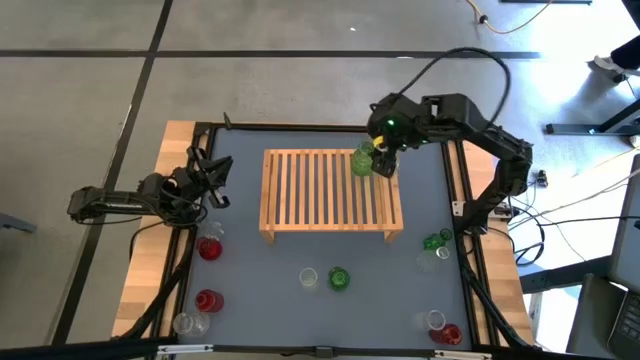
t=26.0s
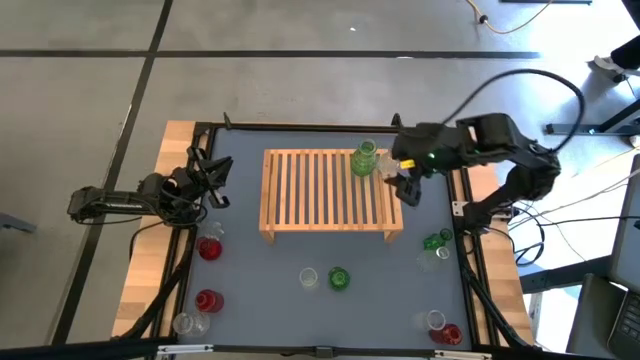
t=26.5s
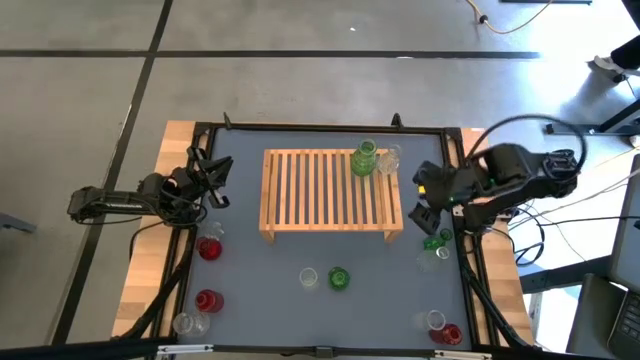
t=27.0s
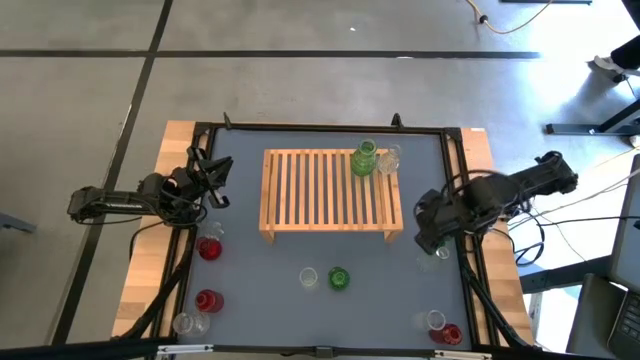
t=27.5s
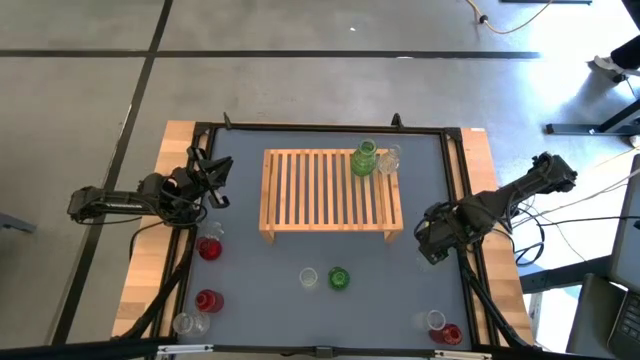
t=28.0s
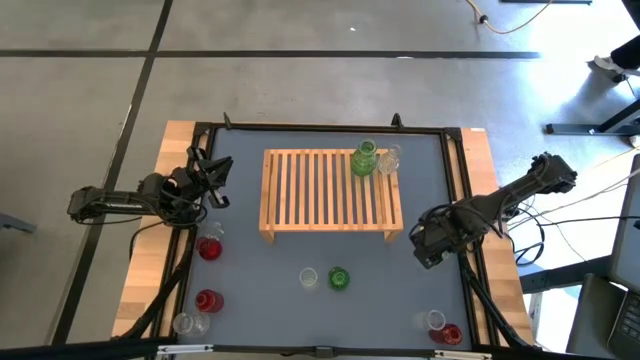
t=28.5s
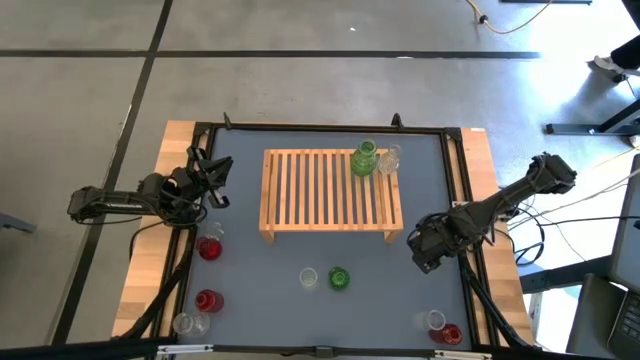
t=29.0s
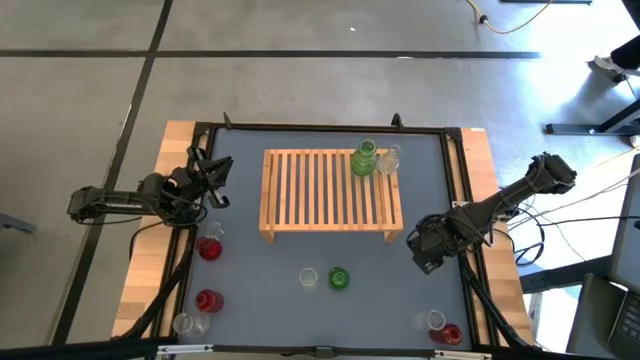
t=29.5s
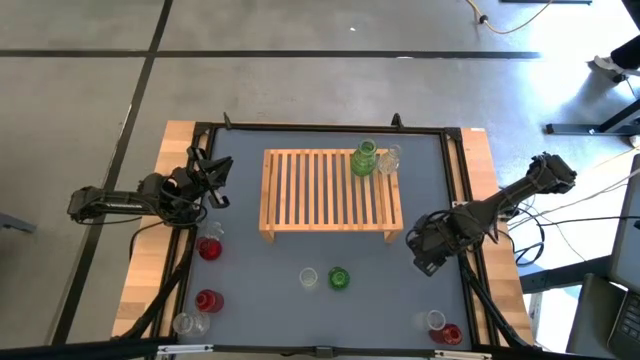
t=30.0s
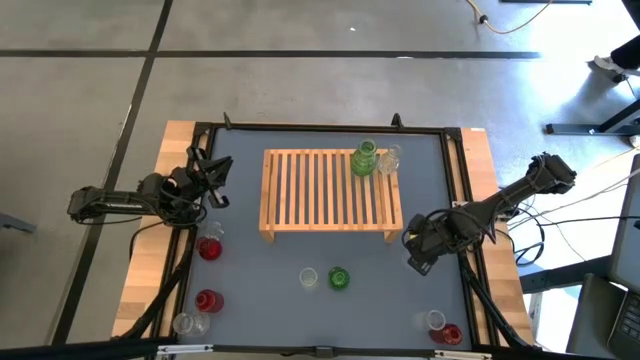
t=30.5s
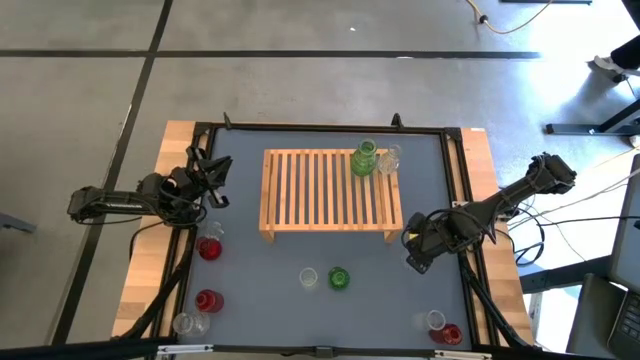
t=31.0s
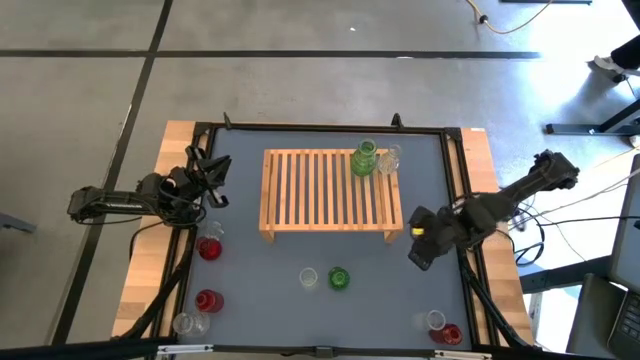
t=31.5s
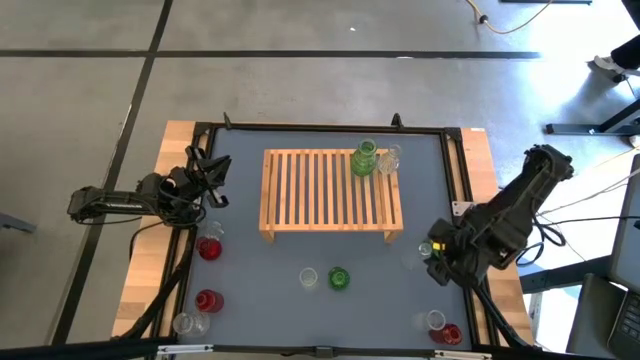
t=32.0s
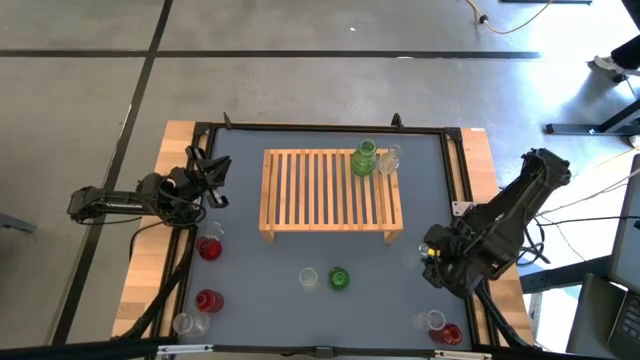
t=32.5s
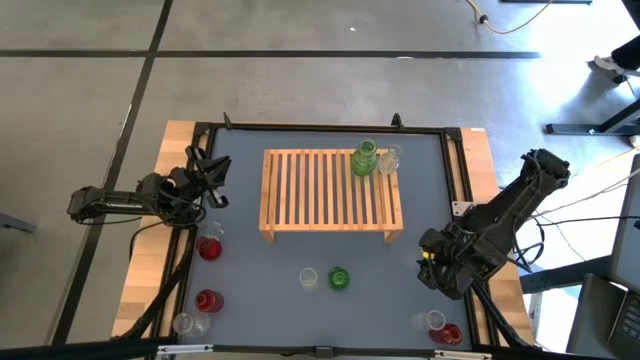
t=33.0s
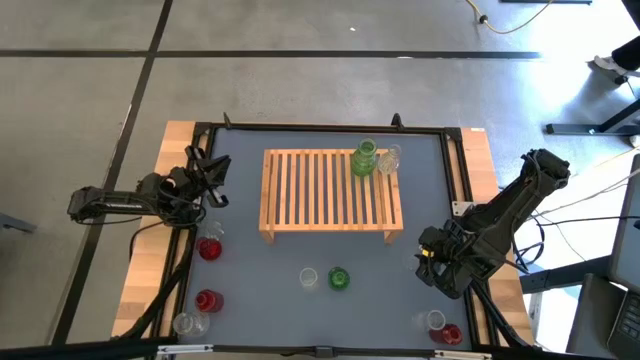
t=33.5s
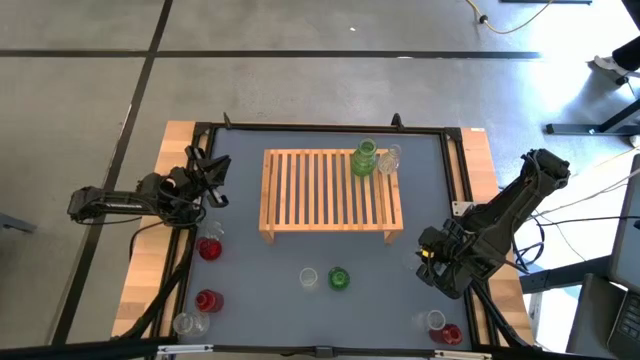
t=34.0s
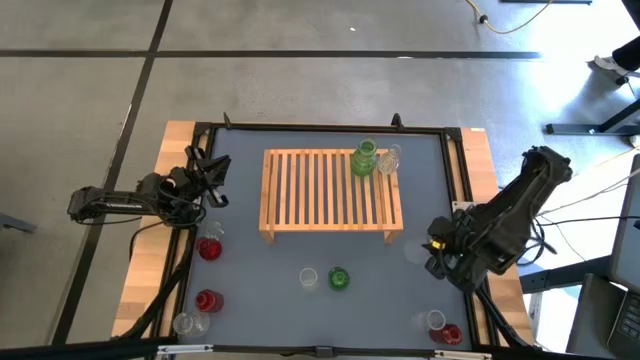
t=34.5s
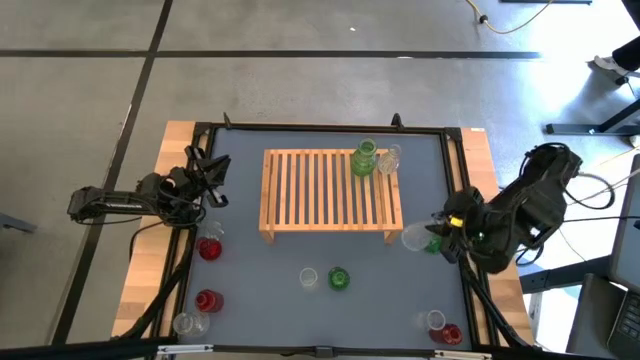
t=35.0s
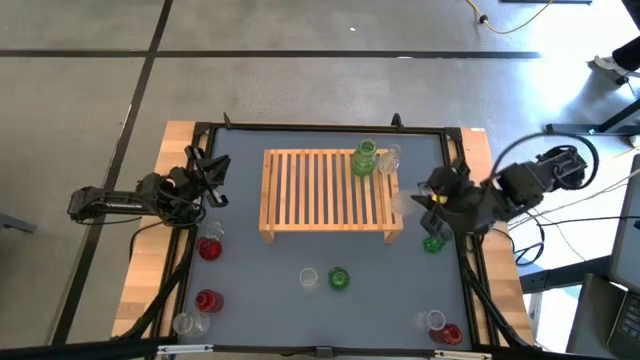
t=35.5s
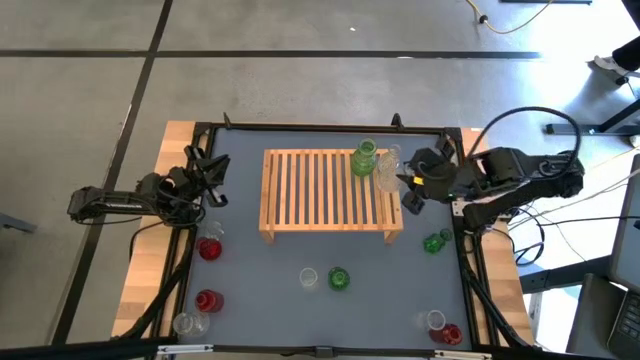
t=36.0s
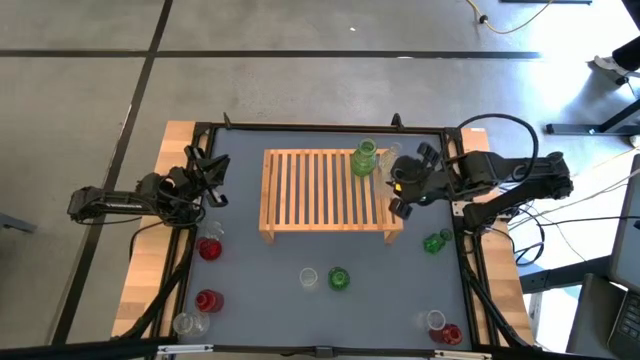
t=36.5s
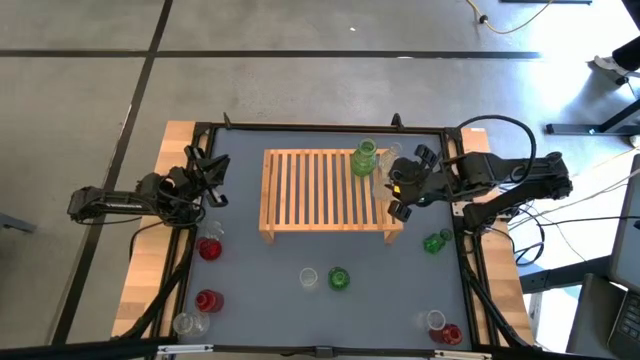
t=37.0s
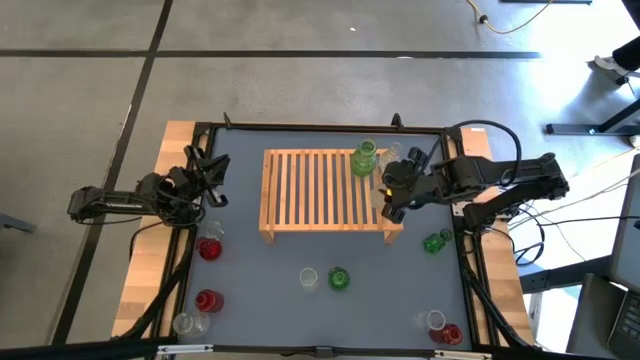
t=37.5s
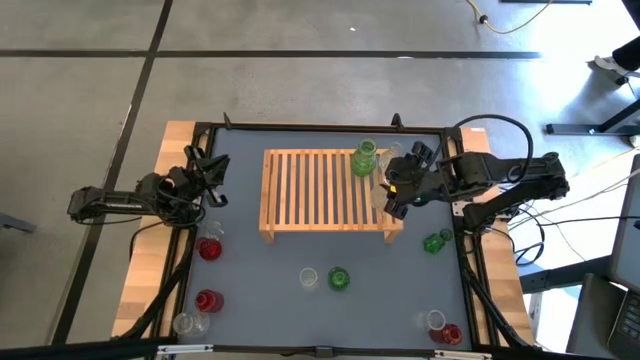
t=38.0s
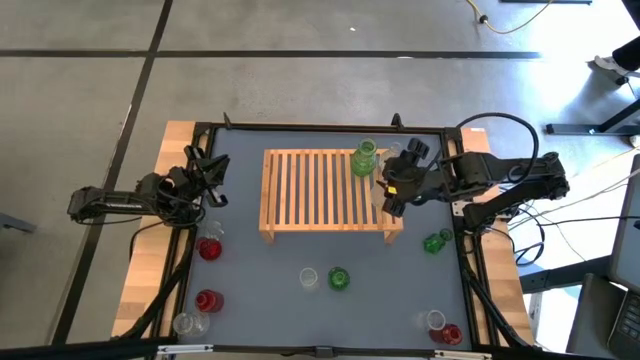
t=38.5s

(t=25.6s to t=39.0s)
Task: sort vases onto shelf
Put the transparent bottle on the shelf

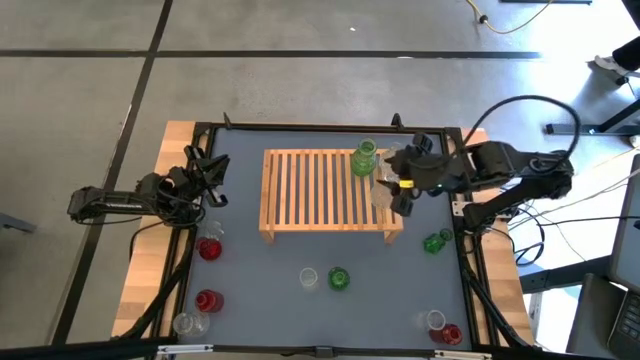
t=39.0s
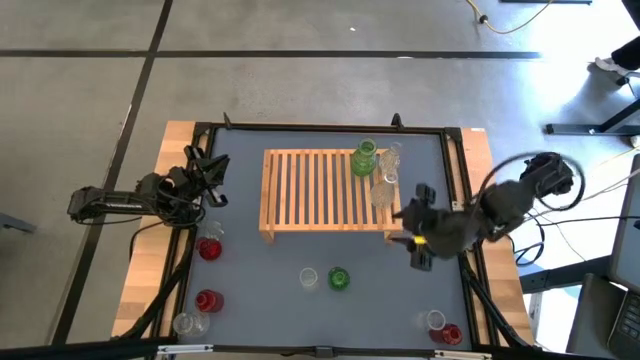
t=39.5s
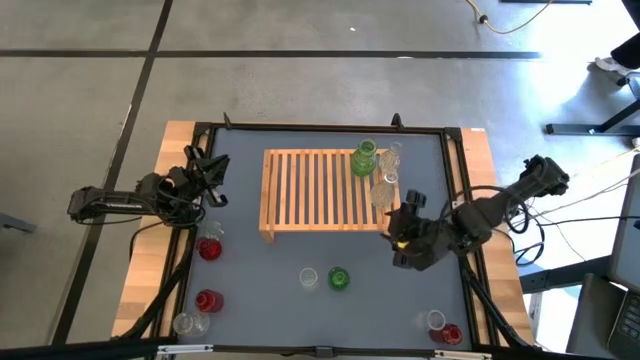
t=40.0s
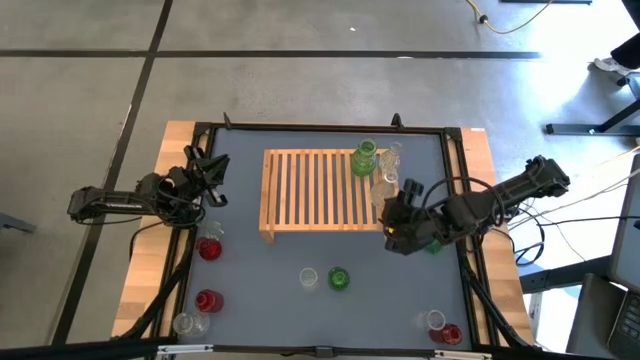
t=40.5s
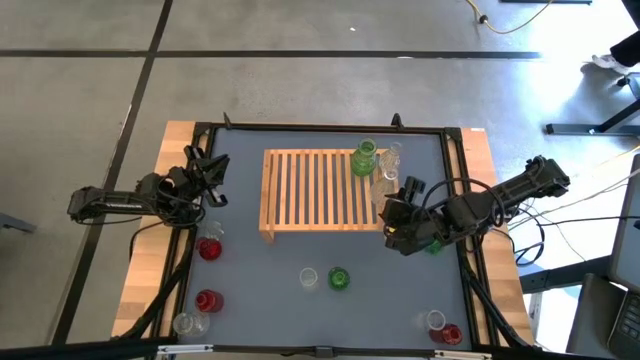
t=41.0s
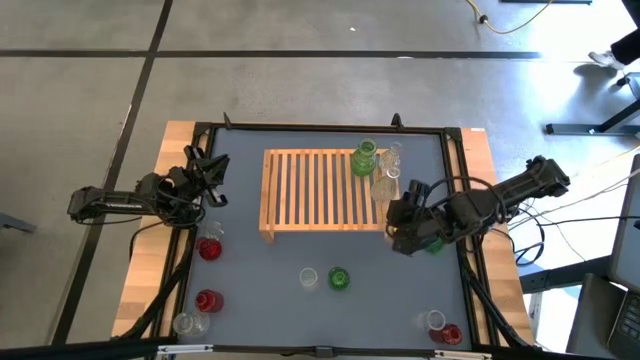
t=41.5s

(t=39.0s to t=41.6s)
Adjust the transparent bottle on the shelf

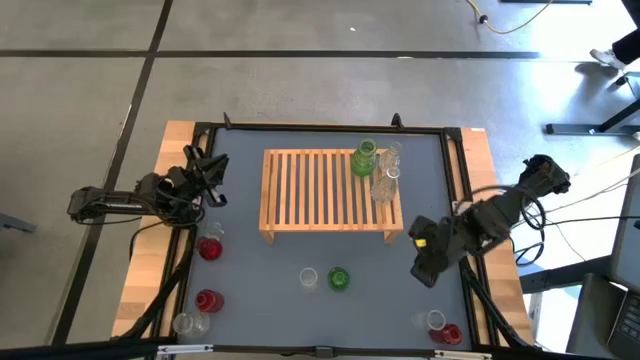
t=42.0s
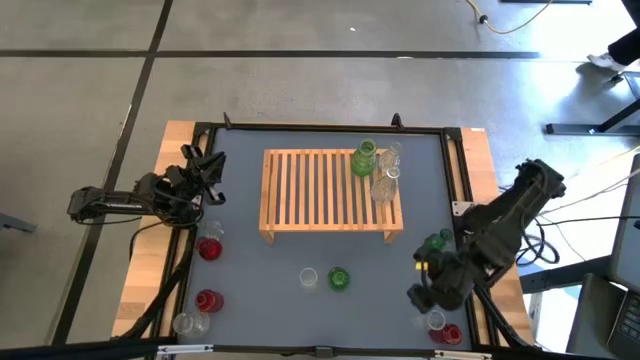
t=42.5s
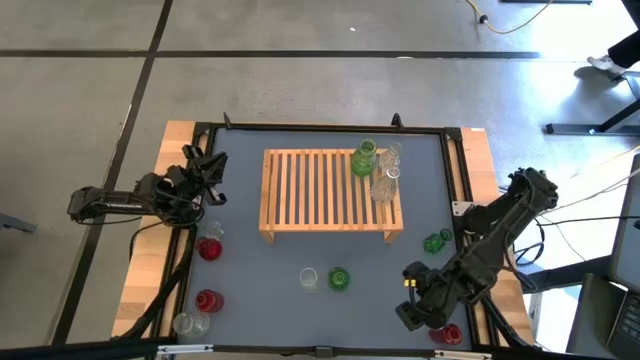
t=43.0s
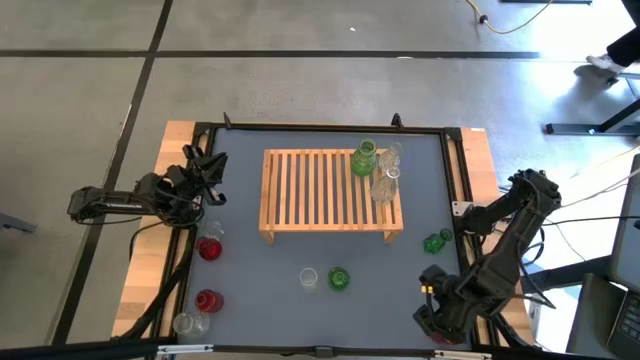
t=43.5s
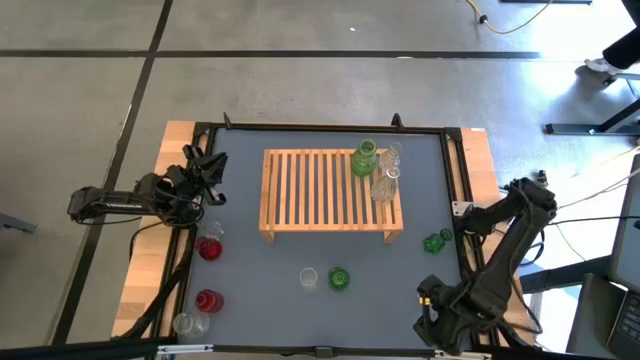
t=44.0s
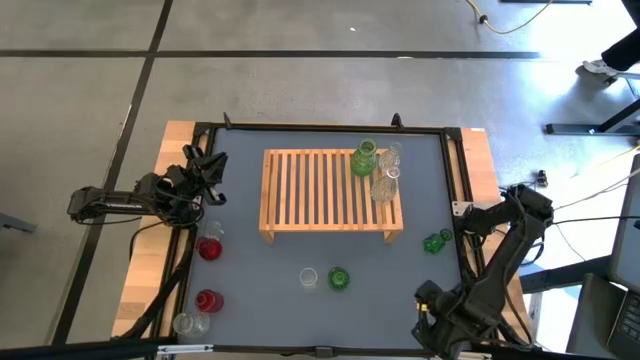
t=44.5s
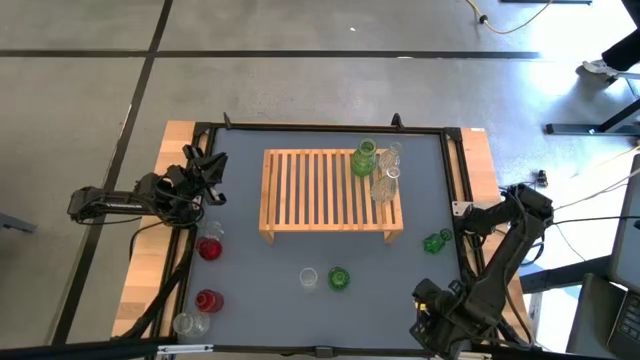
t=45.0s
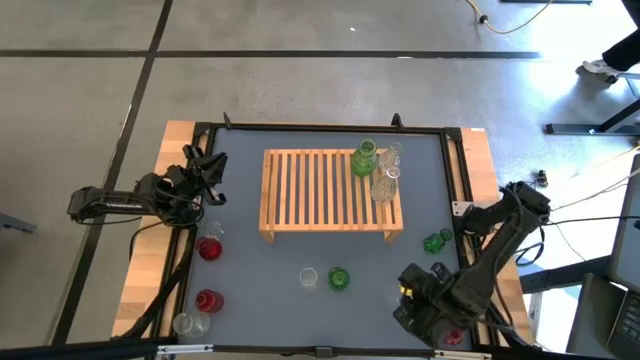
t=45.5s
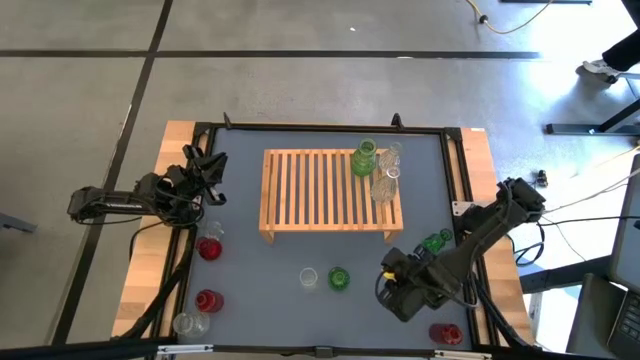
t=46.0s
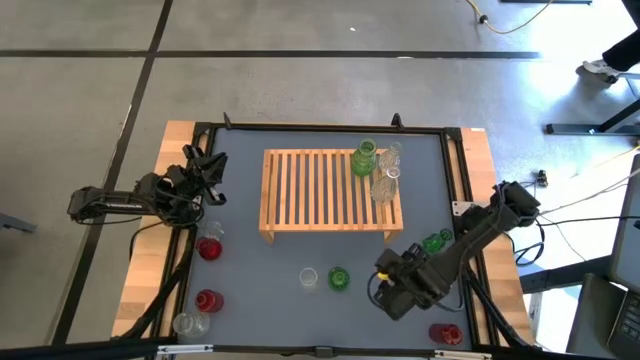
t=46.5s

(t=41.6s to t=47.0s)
Move the transparent bottle to the middle right
